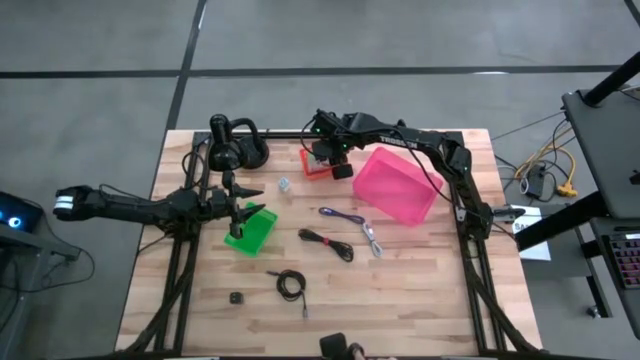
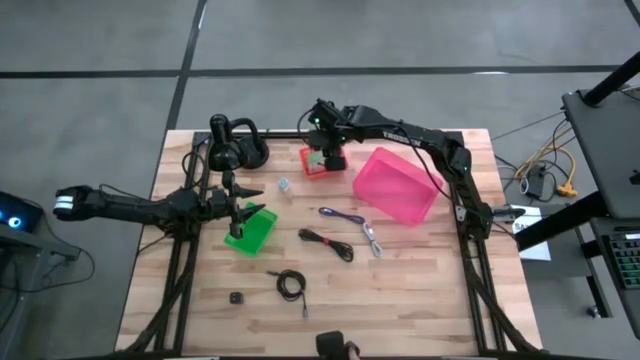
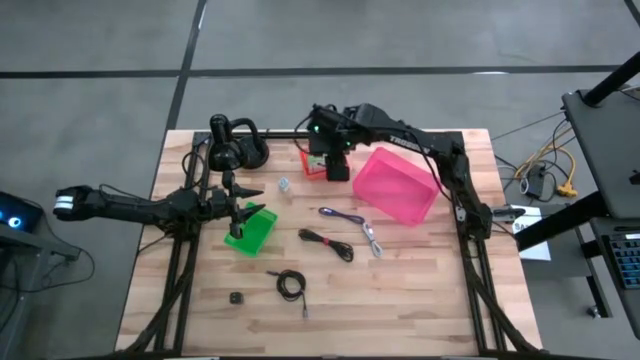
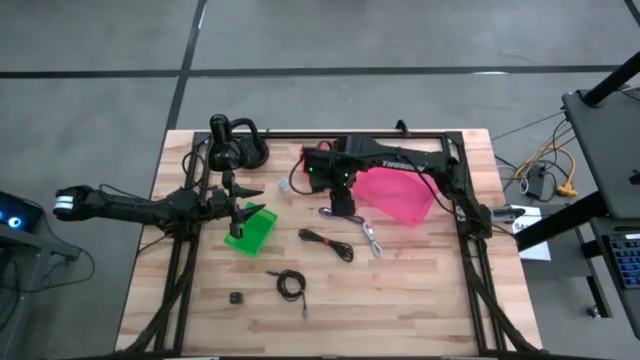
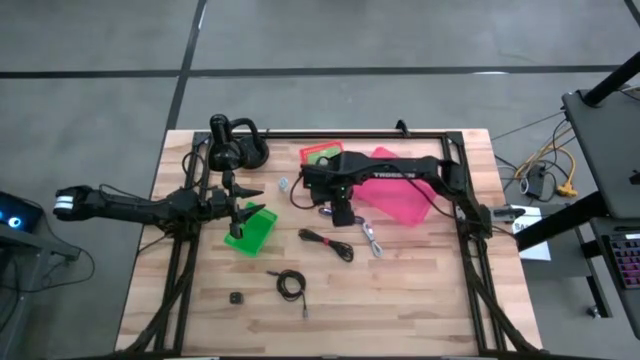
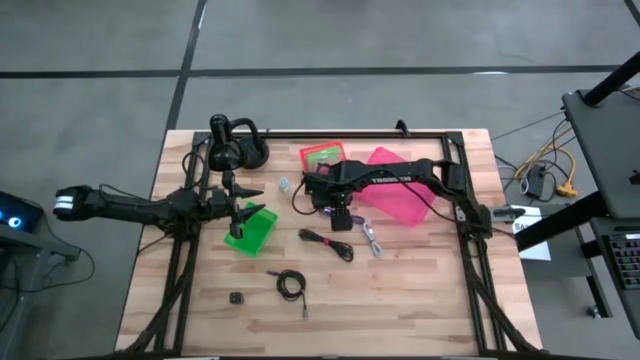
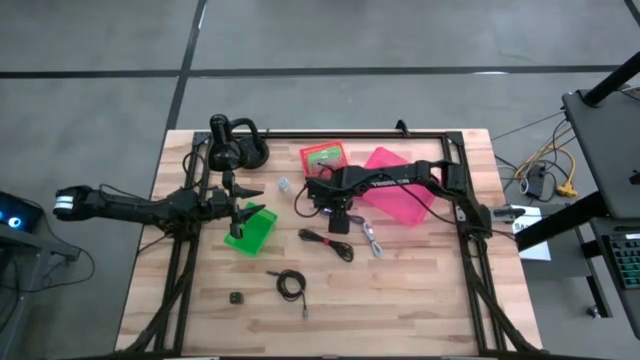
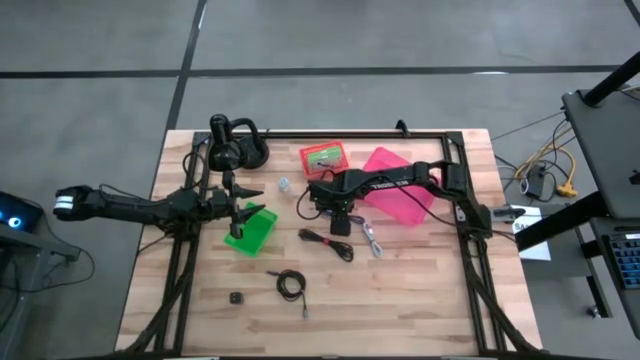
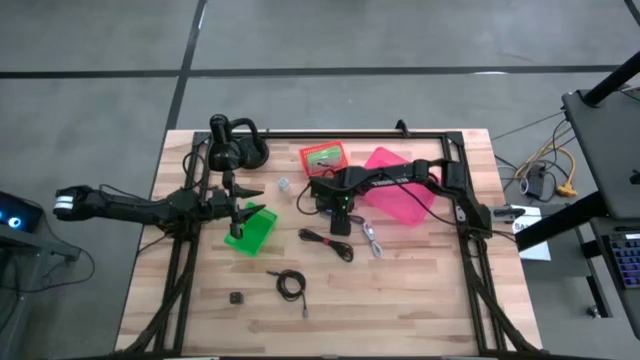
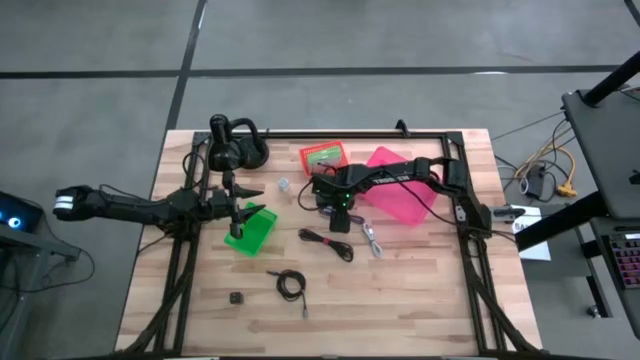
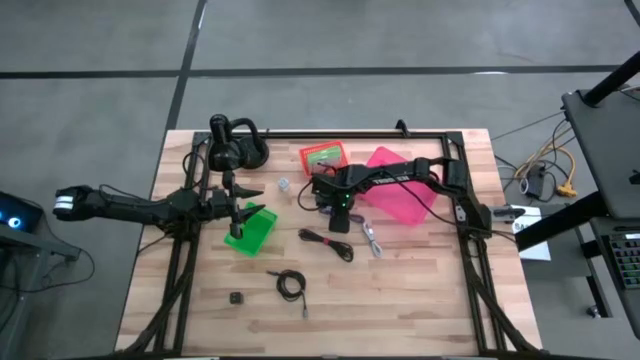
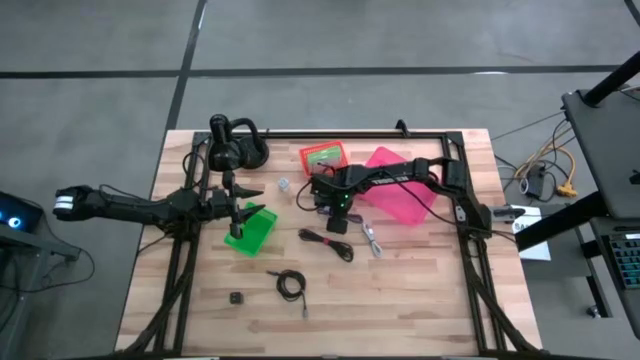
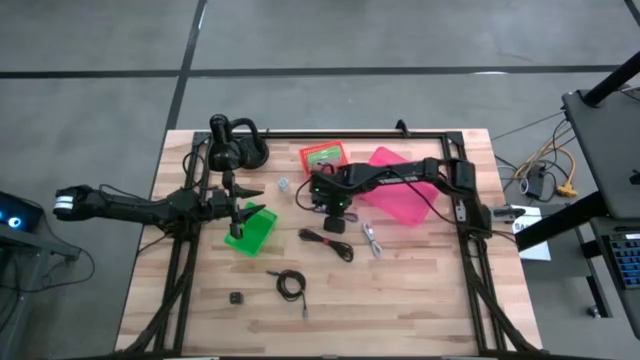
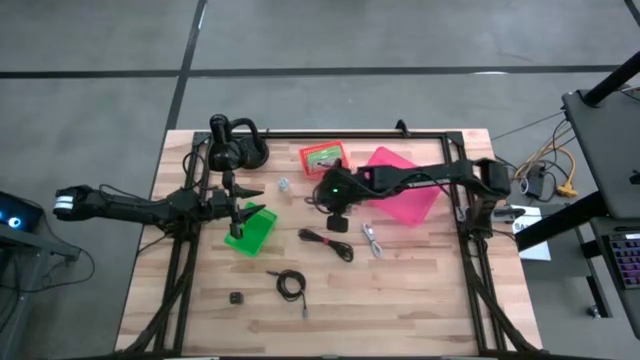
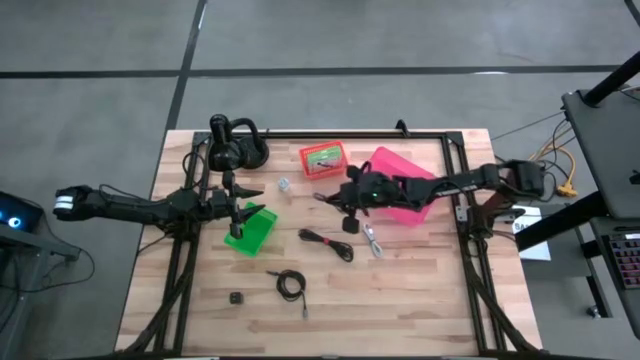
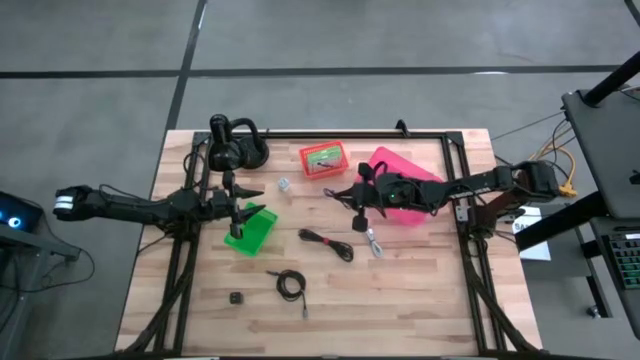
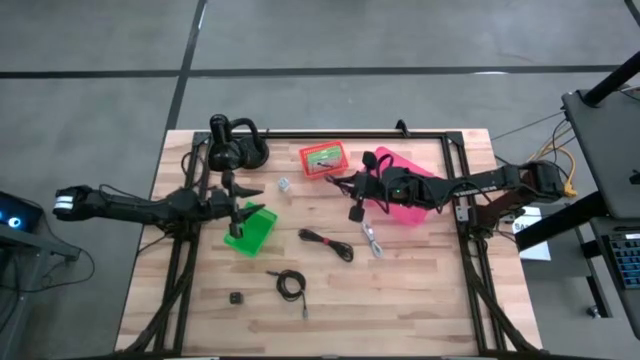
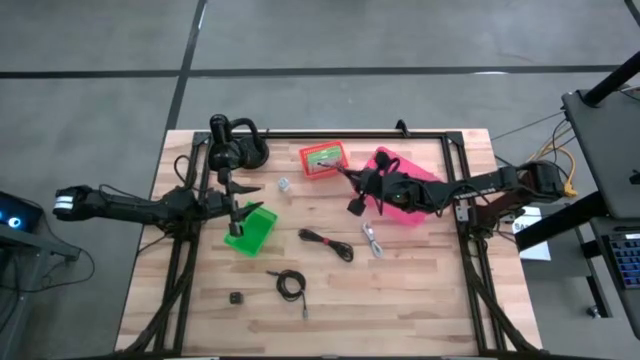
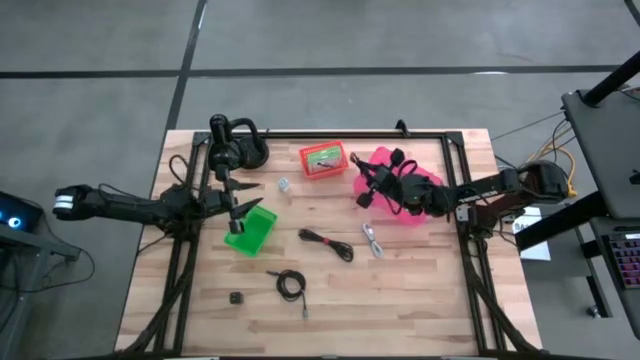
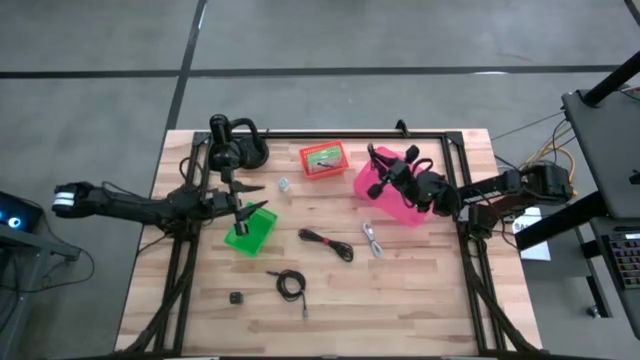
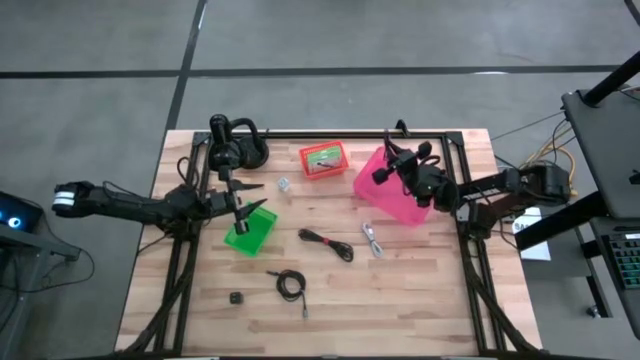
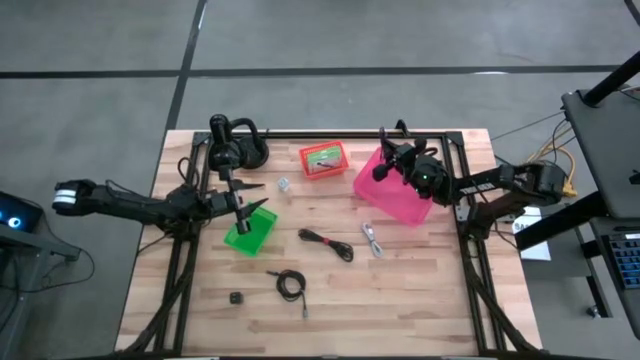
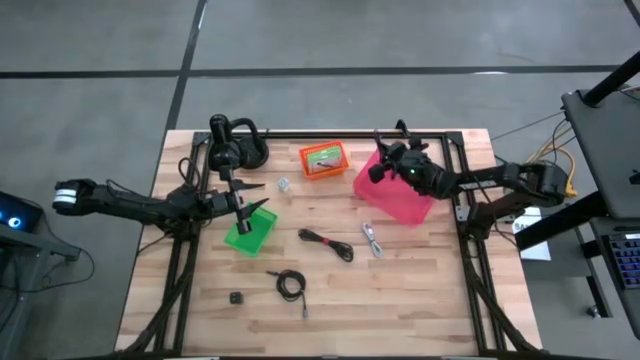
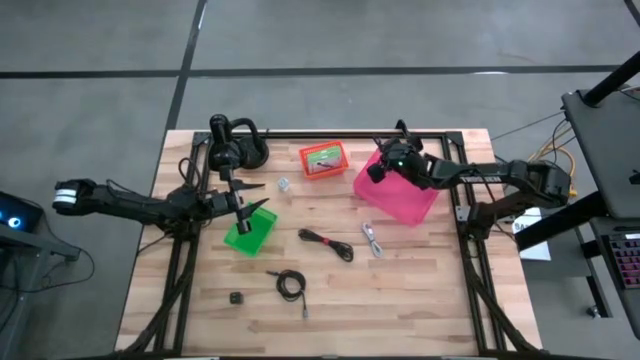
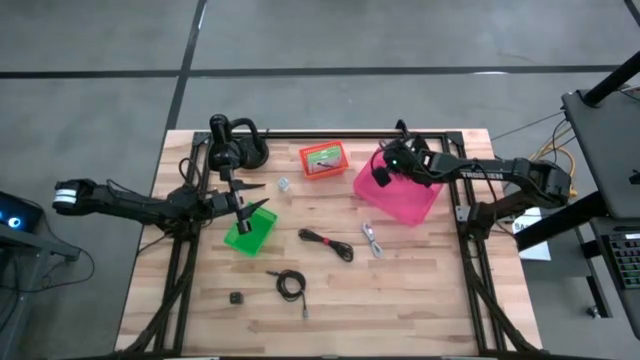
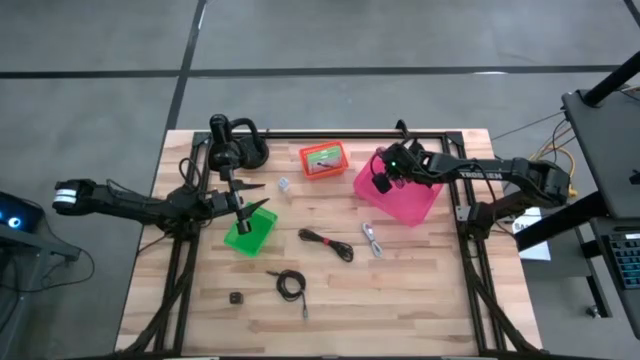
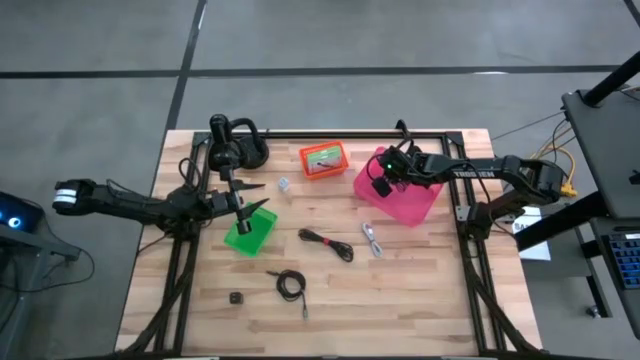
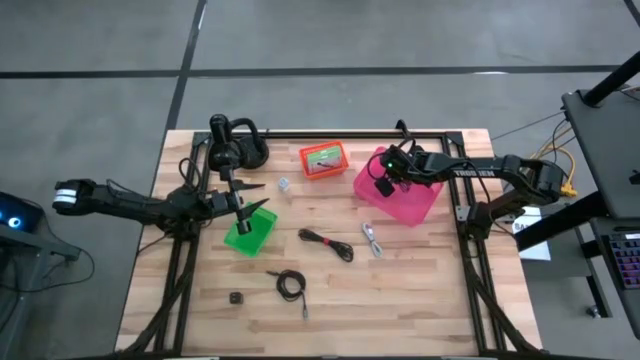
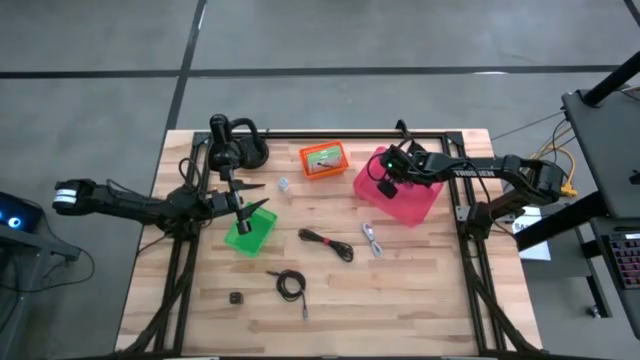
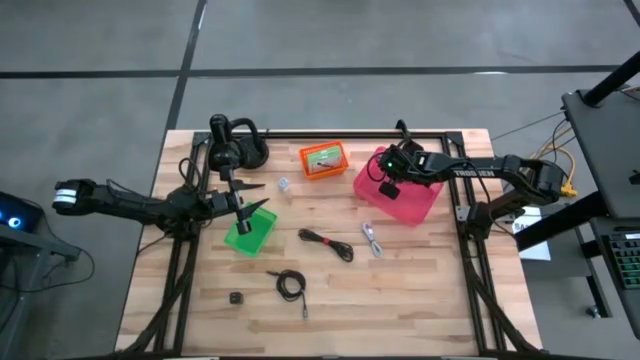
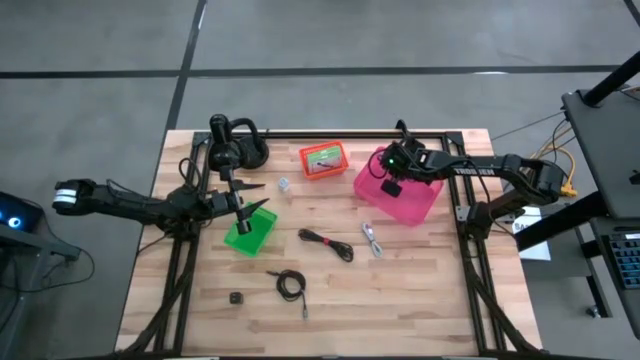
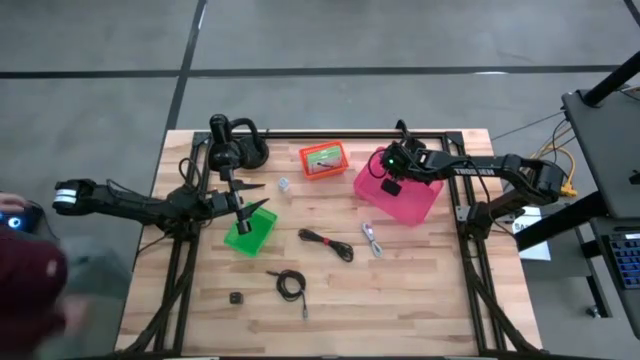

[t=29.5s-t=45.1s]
Task: Pick and place items into bin
Put the blue charger cable into the pink bin

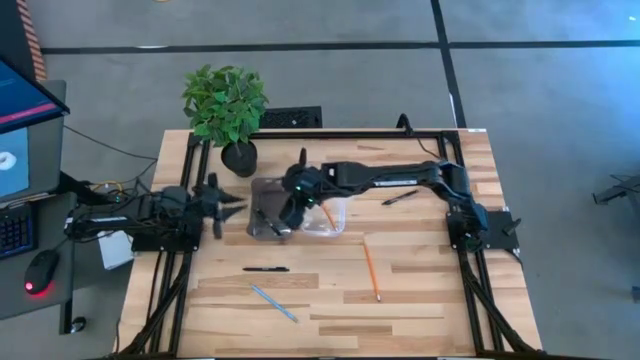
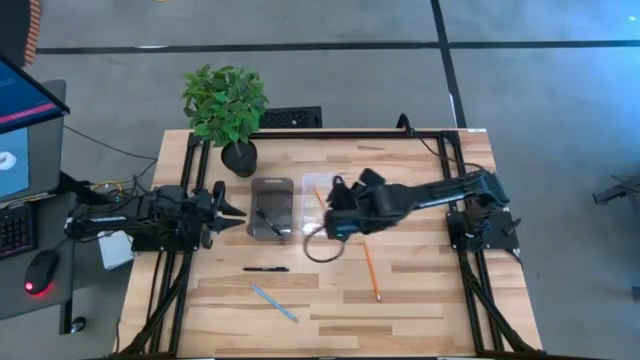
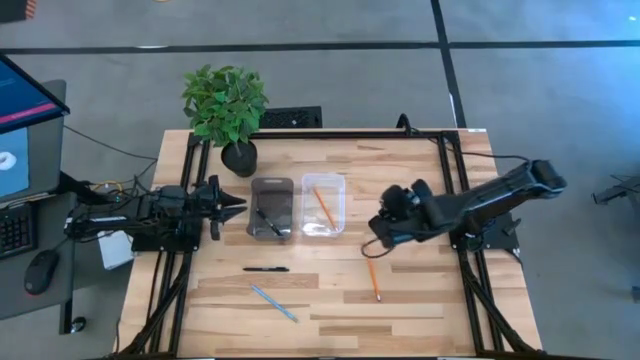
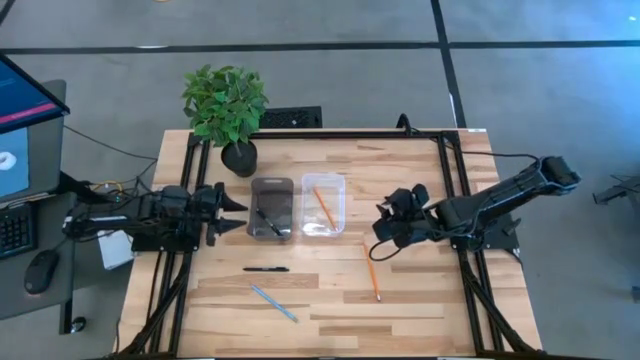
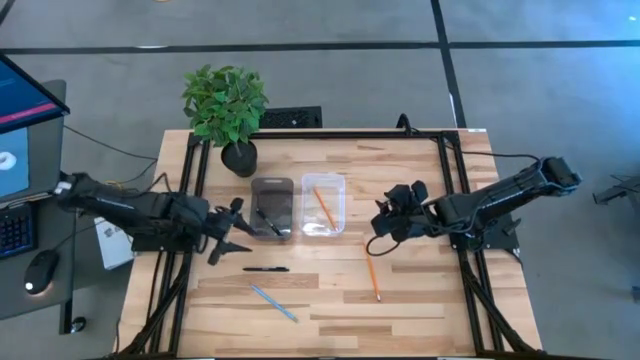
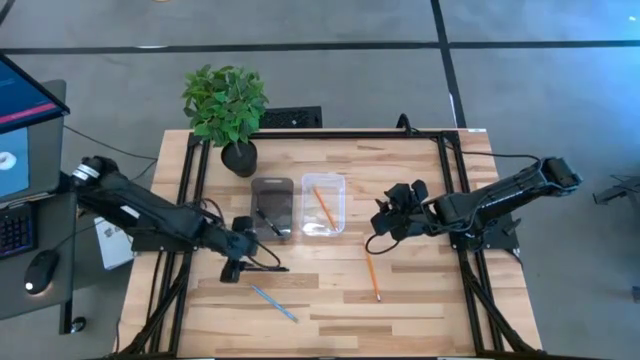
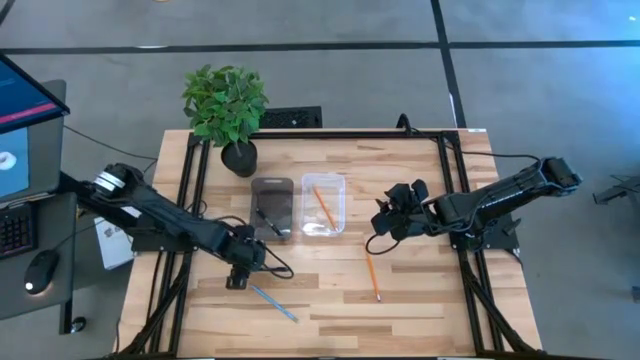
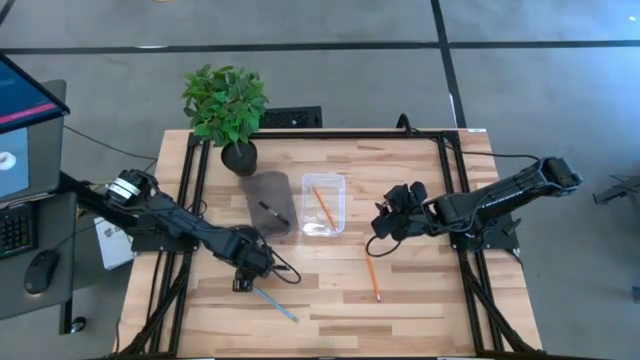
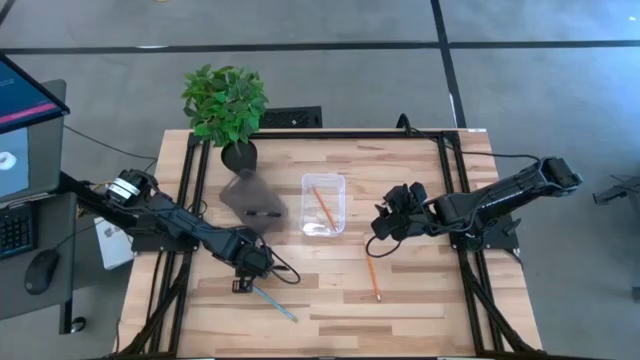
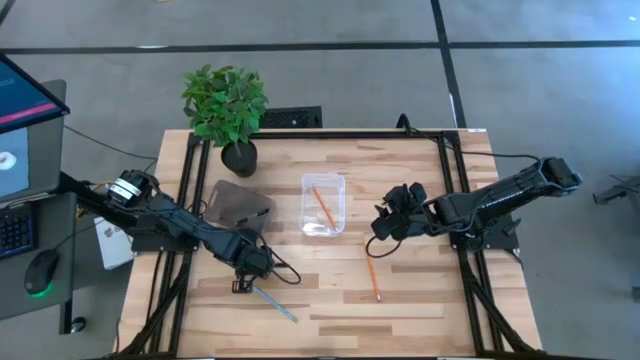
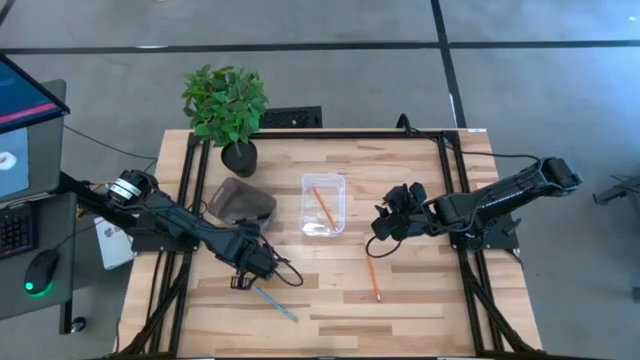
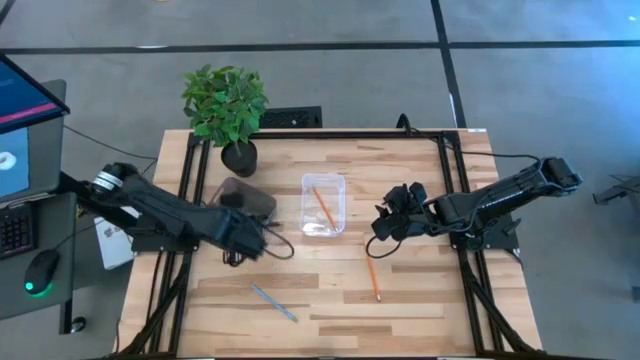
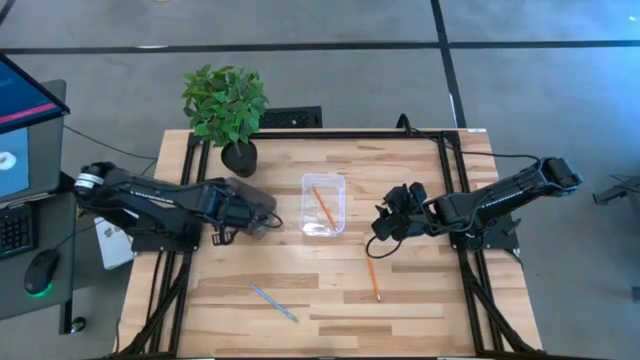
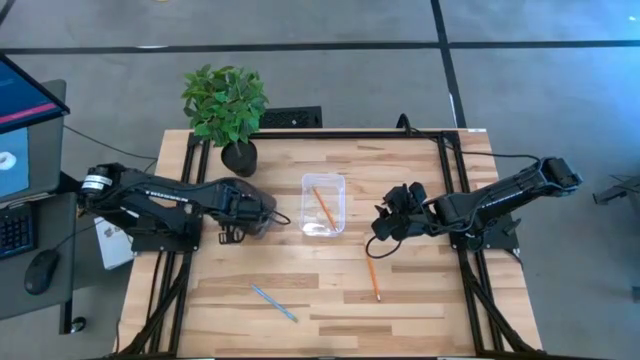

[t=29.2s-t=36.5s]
Task: Sort pens & pencils
Put the bottom black pen into the black bin
